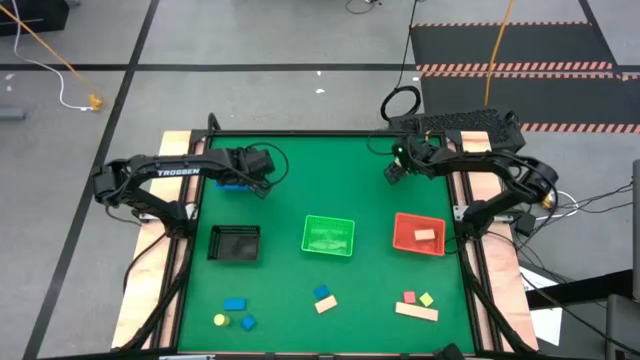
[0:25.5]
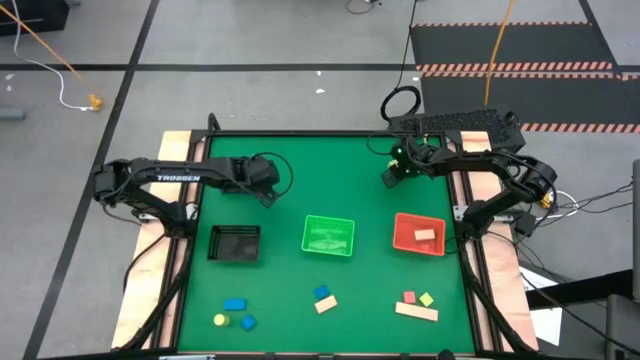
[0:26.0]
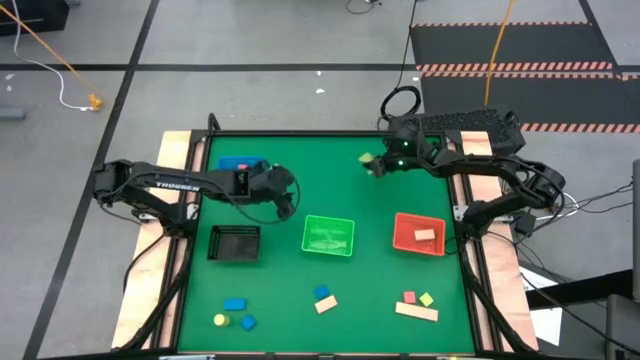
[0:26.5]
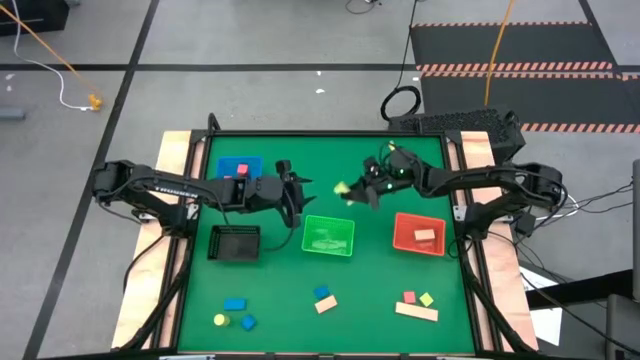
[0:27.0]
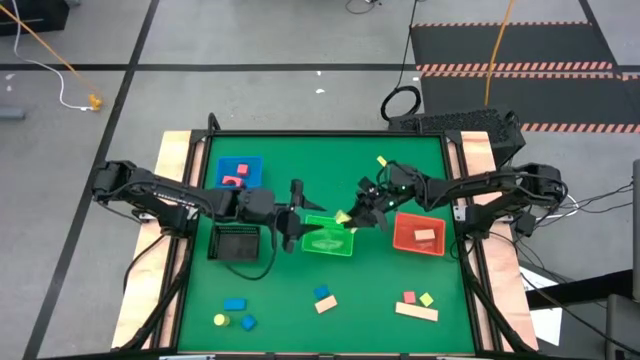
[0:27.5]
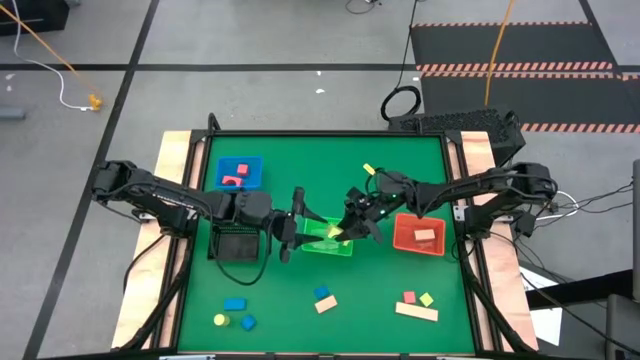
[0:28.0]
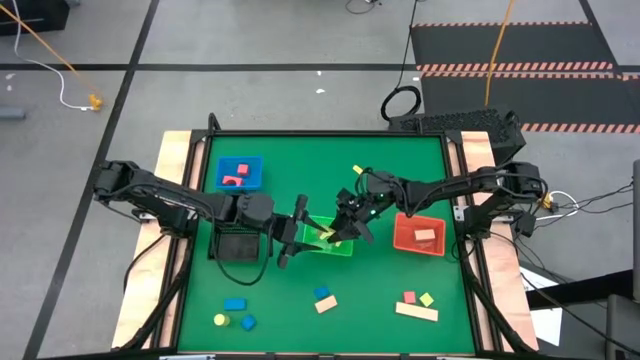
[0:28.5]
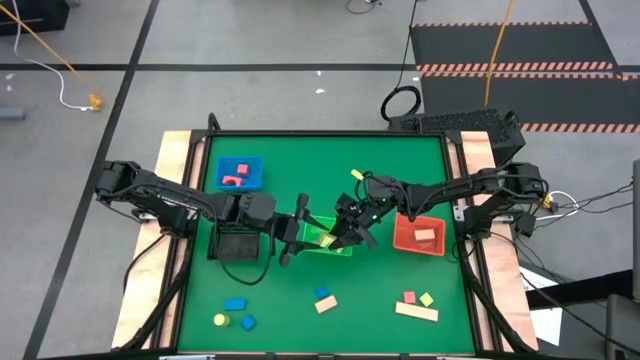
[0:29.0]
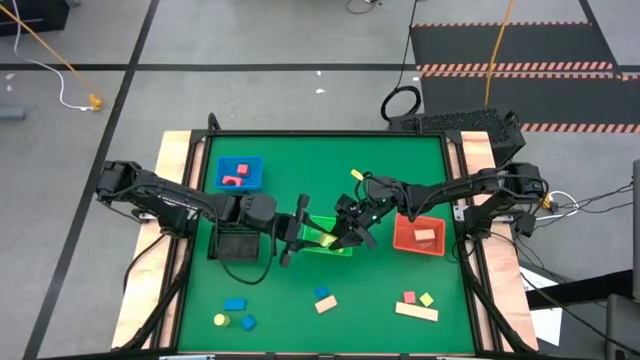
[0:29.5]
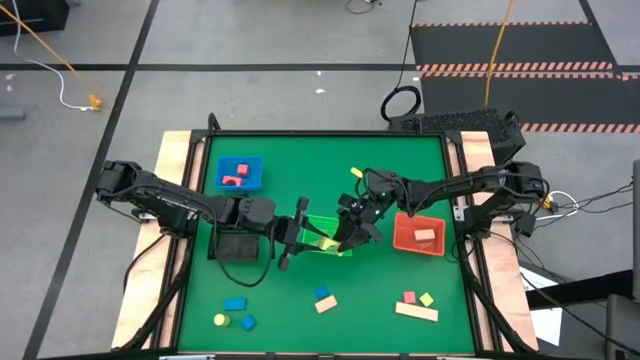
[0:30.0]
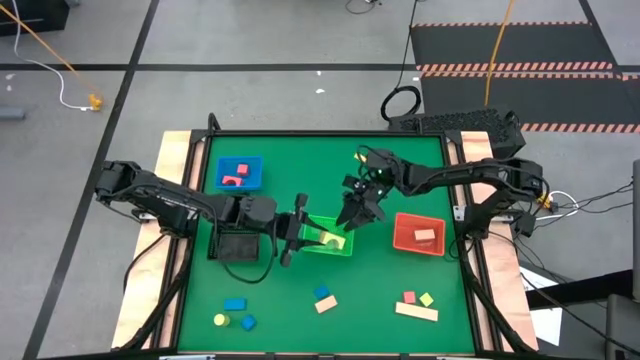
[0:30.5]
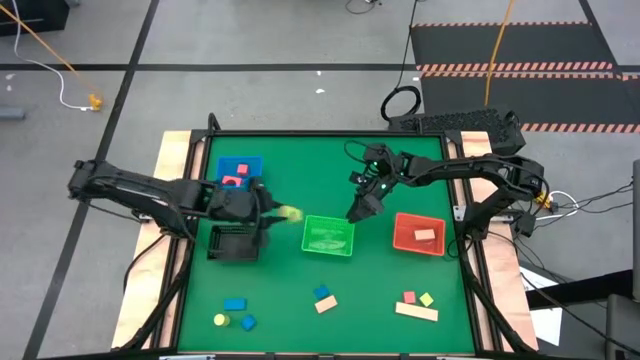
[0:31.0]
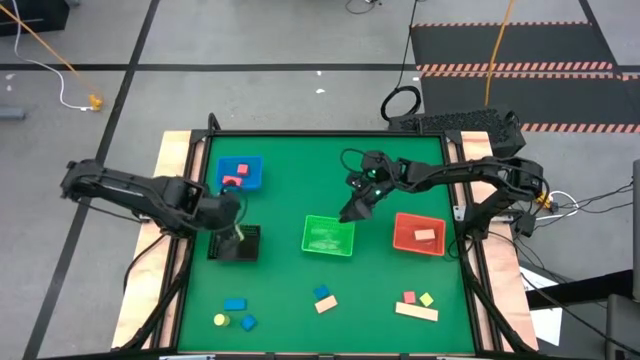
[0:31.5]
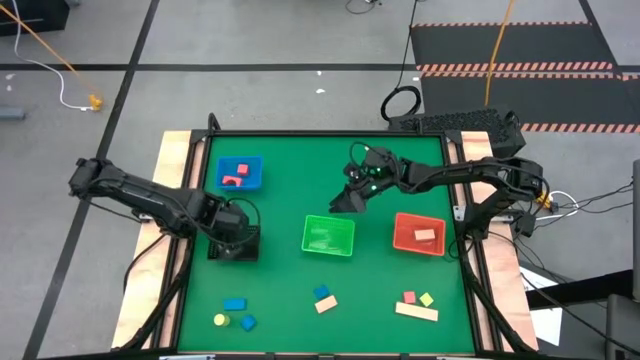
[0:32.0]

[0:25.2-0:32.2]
Task: Sort & place blocks by color
Put the top right light green block into the black basket

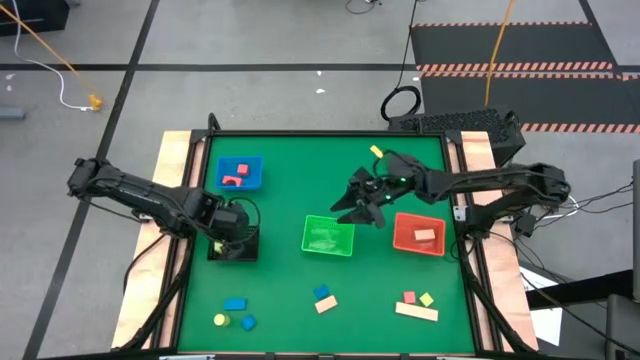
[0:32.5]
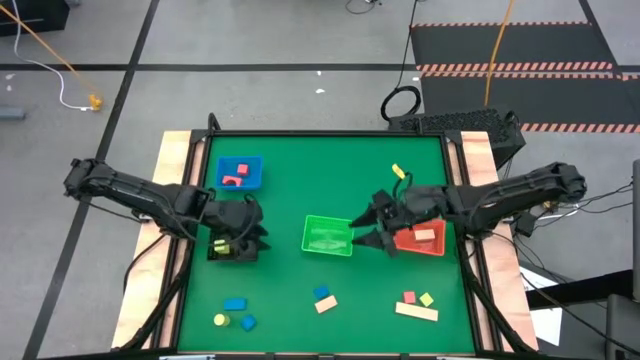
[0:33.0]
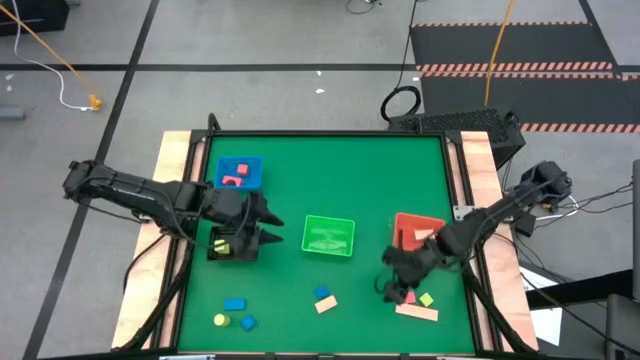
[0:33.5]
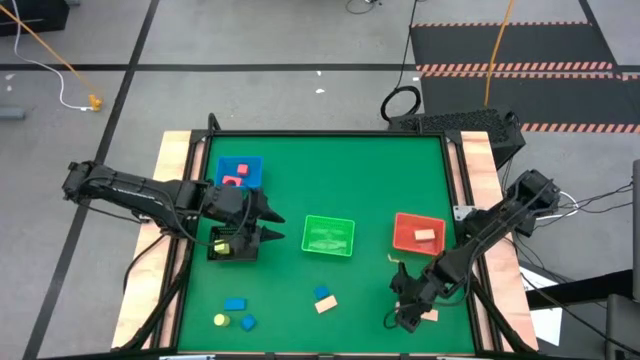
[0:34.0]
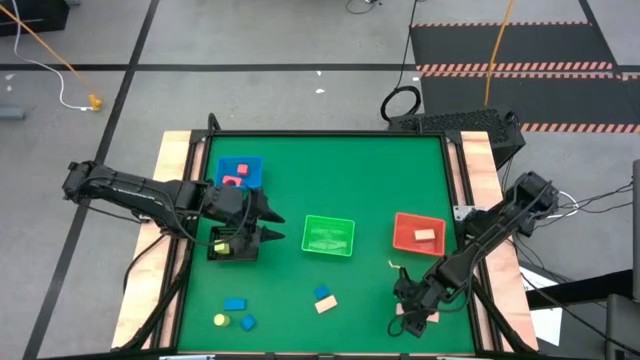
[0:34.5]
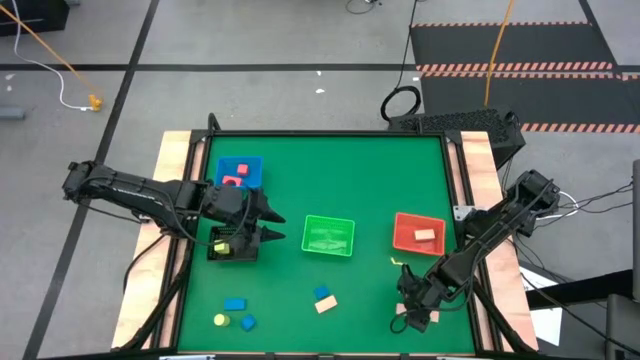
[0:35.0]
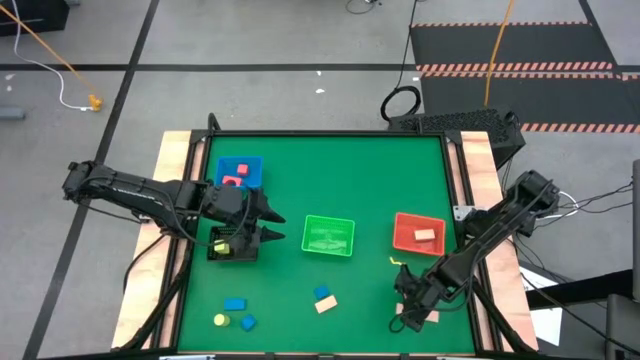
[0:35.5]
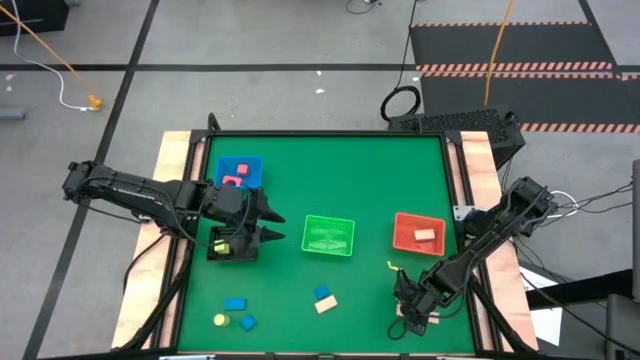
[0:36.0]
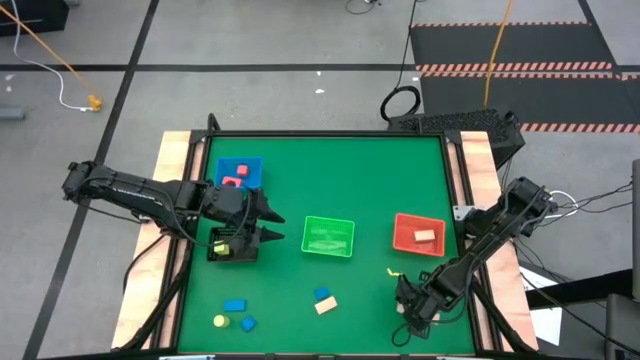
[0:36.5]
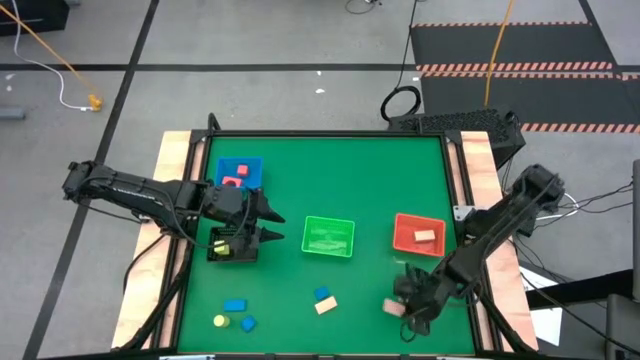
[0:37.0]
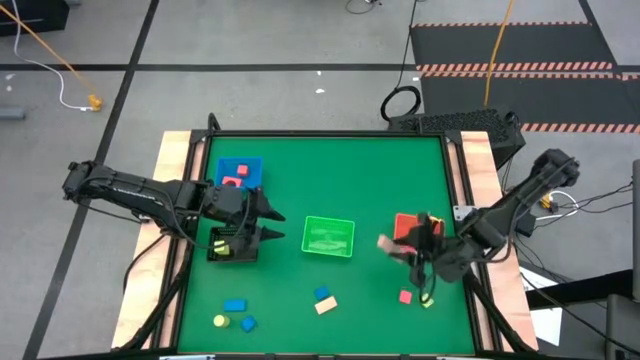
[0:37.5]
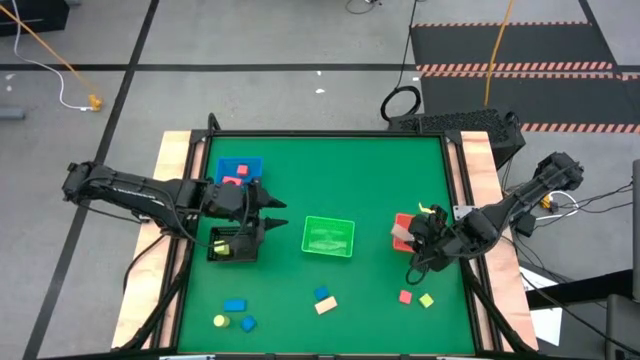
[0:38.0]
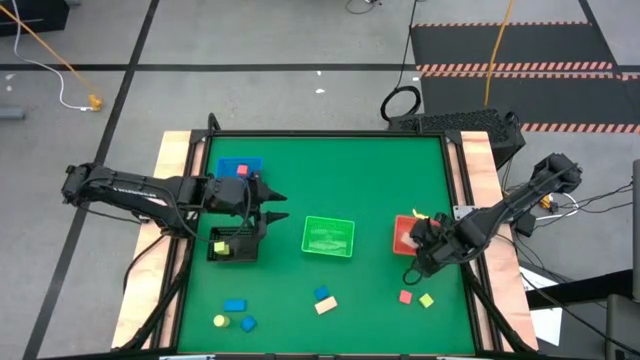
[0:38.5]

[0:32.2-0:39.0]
Put the right brown block into the orange basket

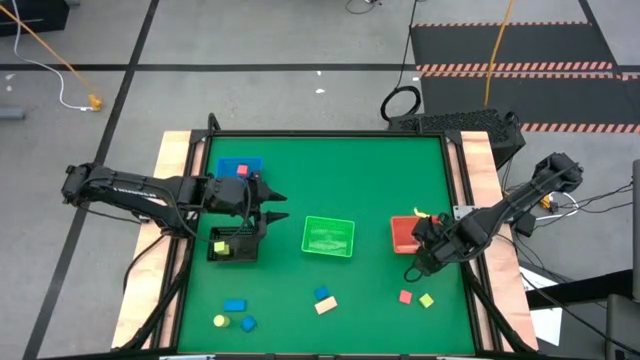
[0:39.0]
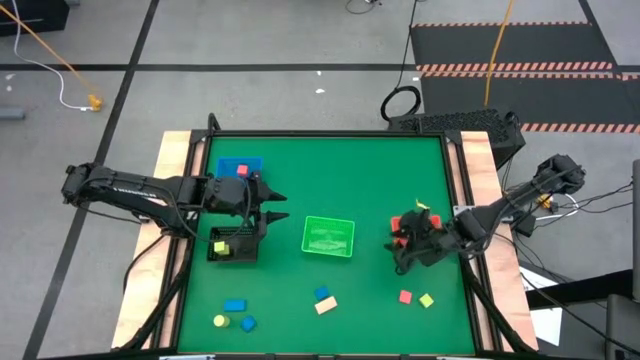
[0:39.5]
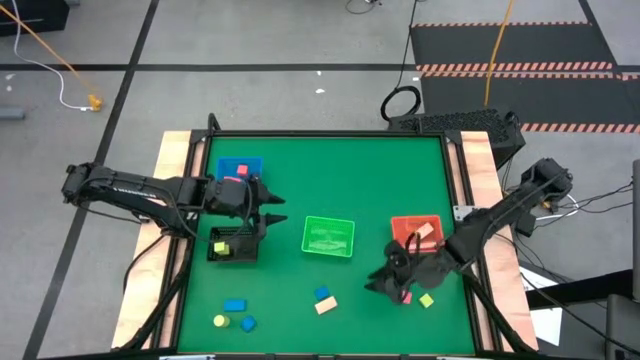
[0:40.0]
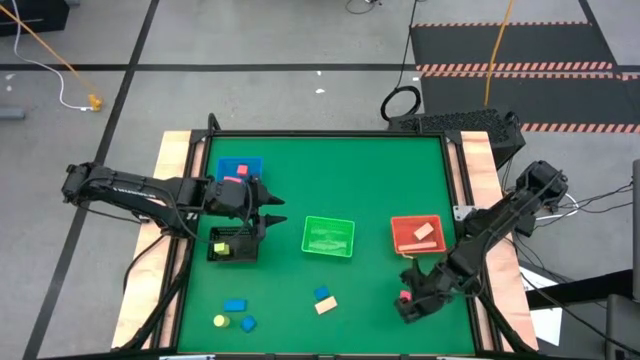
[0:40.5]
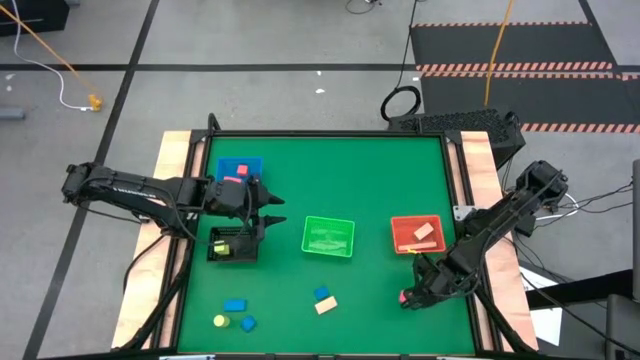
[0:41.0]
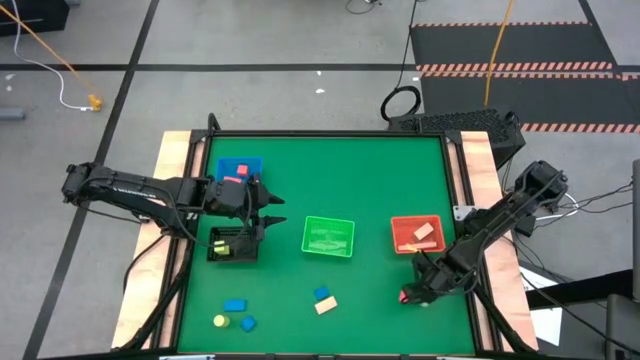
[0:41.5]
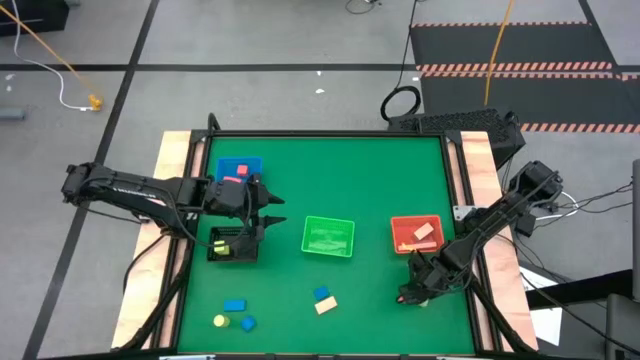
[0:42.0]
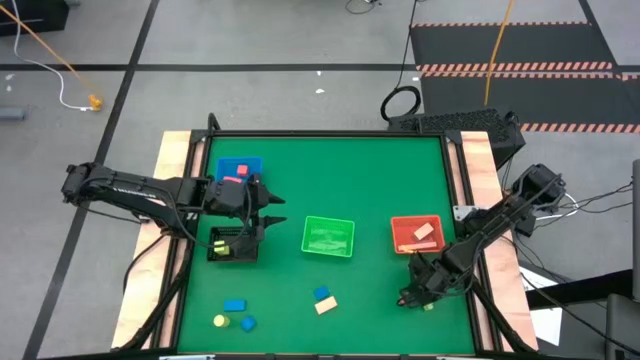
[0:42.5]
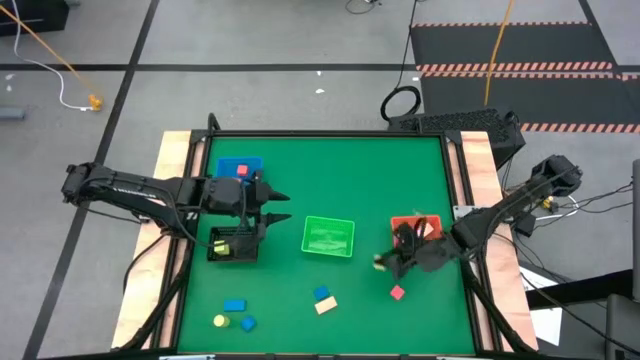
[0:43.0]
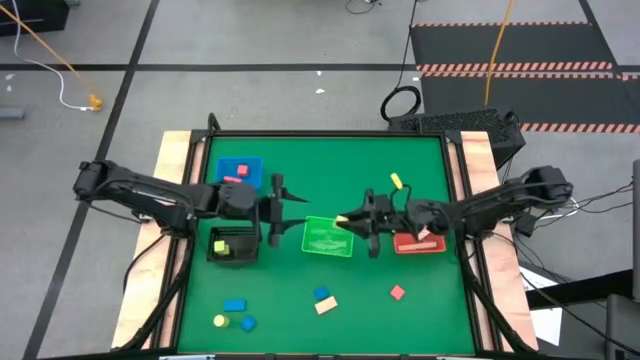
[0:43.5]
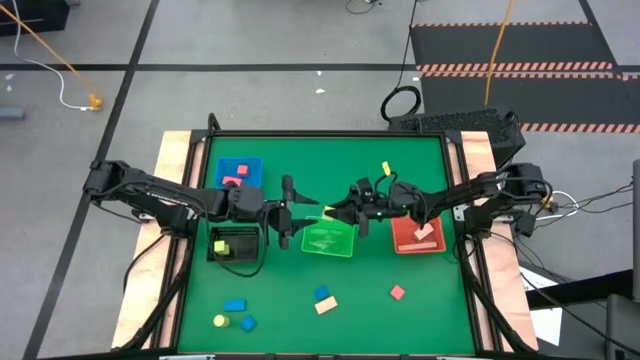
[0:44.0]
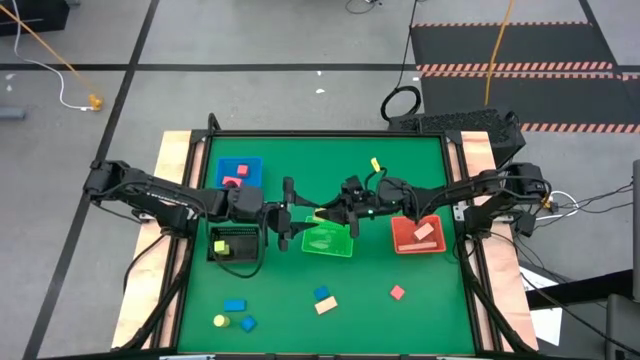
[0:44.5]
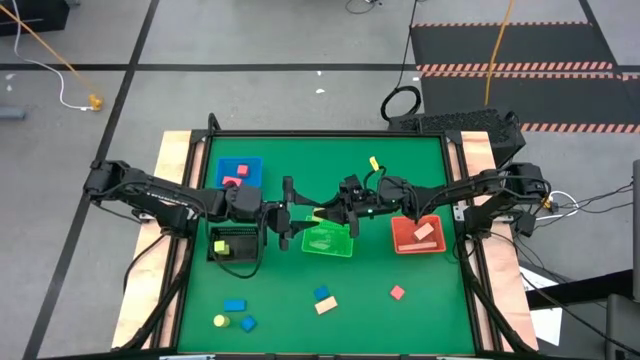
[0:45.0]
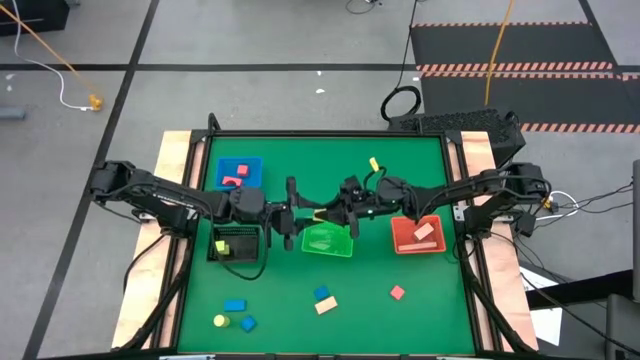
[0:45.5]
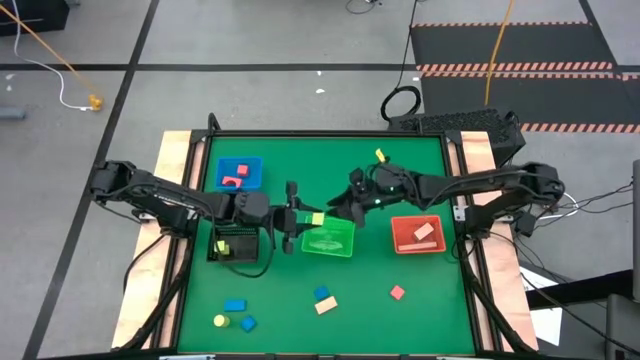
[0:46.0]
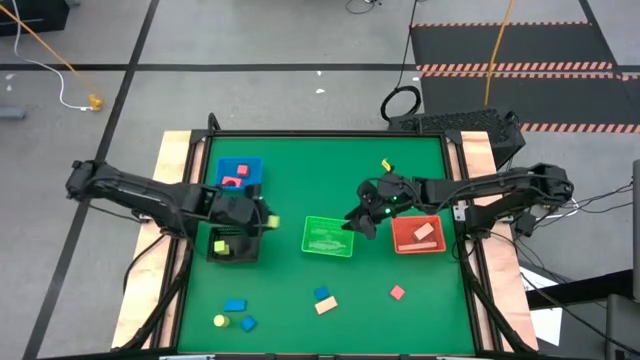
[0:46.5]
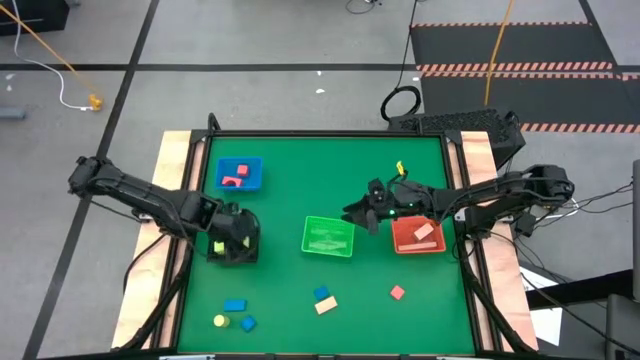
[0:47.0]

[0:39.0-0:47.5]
Put the right light green block into the black basket
